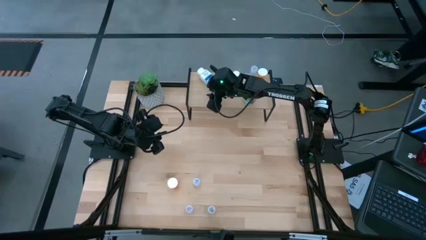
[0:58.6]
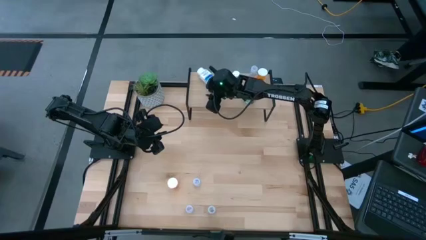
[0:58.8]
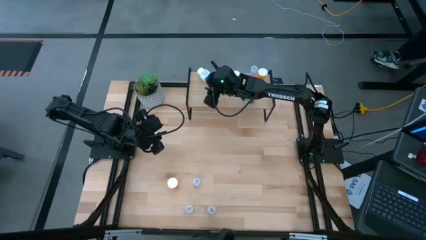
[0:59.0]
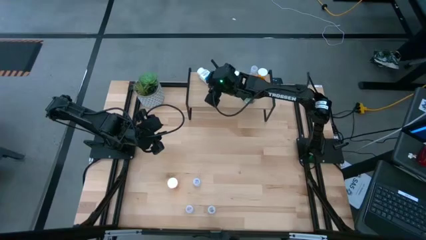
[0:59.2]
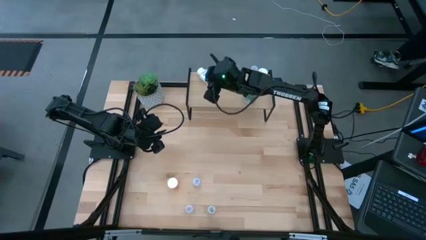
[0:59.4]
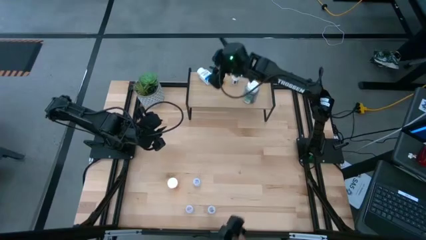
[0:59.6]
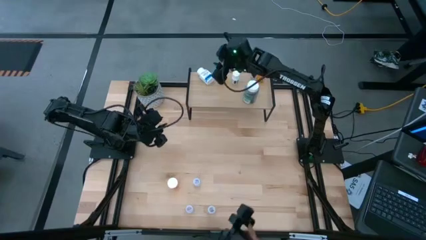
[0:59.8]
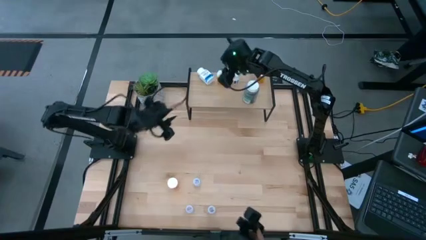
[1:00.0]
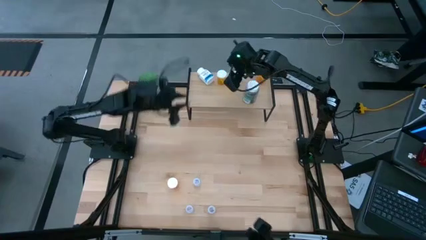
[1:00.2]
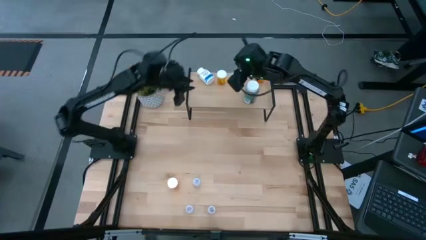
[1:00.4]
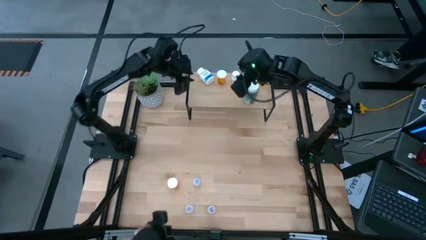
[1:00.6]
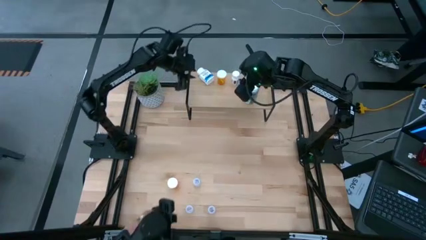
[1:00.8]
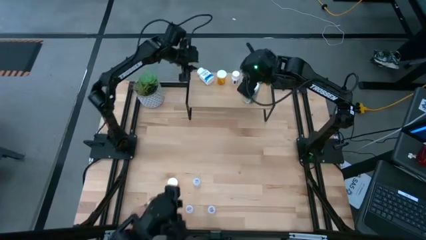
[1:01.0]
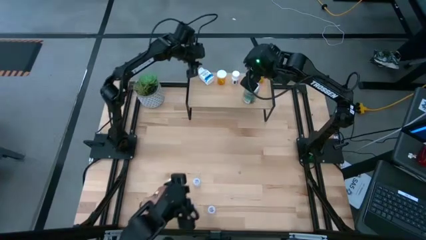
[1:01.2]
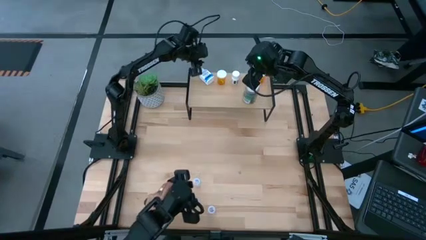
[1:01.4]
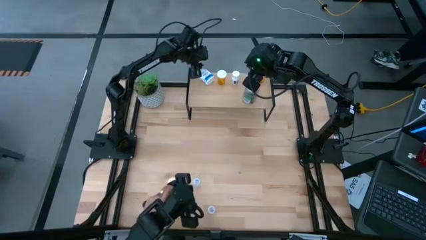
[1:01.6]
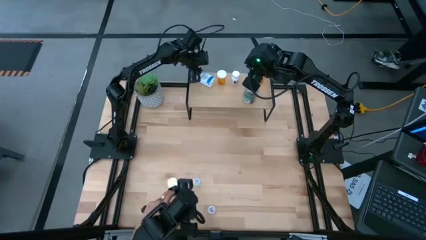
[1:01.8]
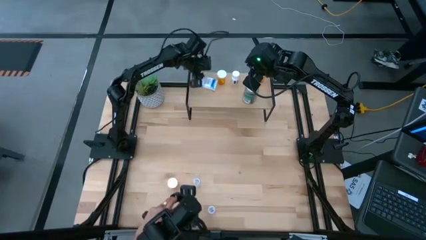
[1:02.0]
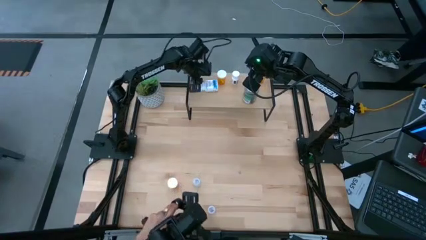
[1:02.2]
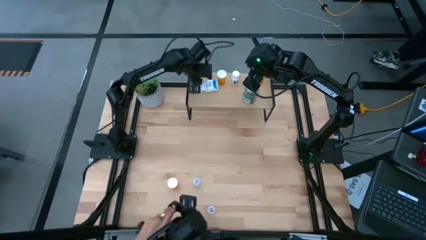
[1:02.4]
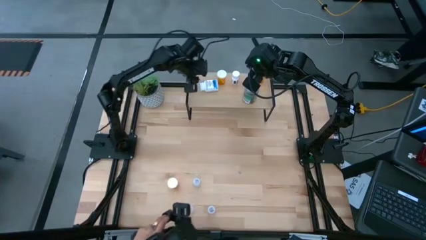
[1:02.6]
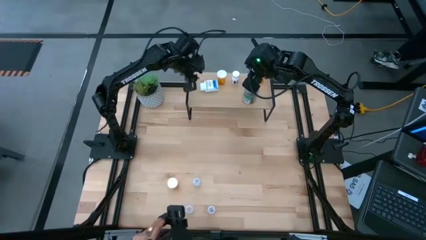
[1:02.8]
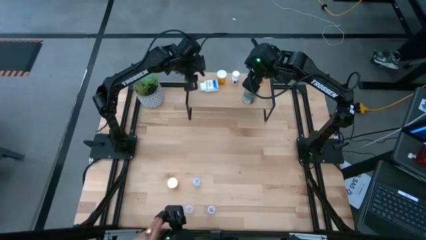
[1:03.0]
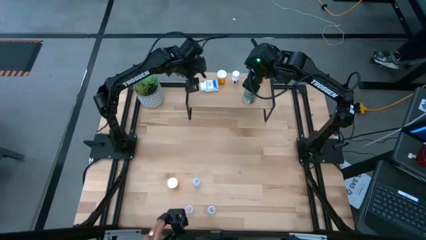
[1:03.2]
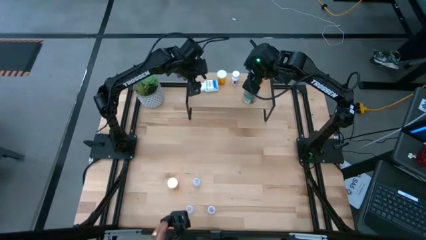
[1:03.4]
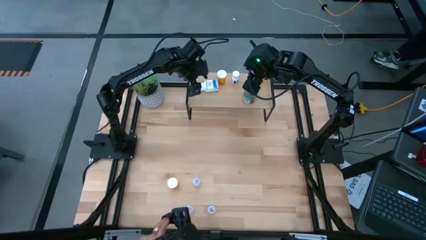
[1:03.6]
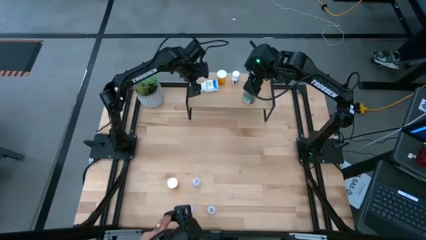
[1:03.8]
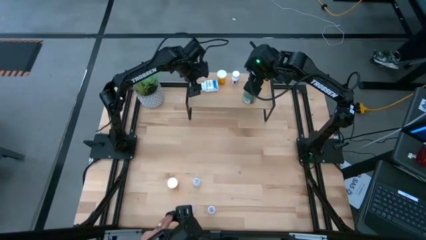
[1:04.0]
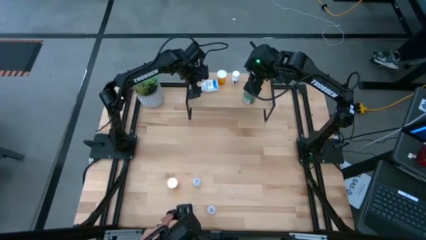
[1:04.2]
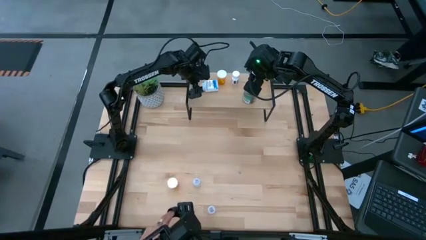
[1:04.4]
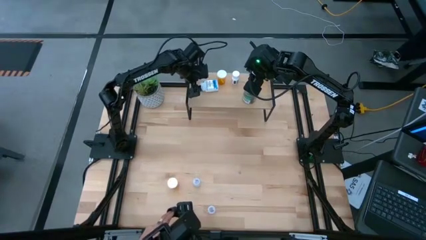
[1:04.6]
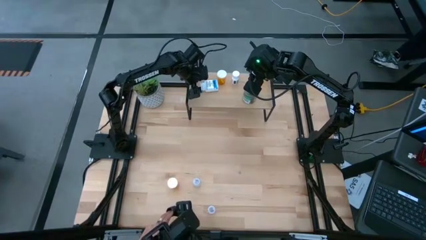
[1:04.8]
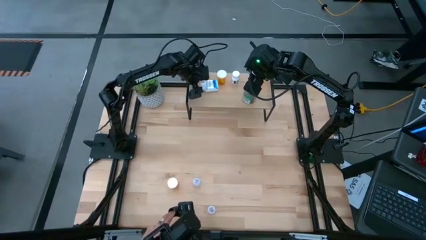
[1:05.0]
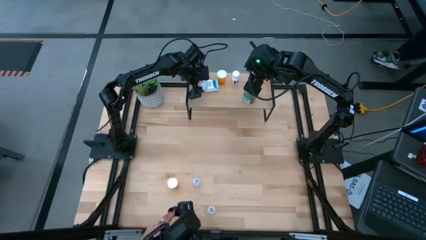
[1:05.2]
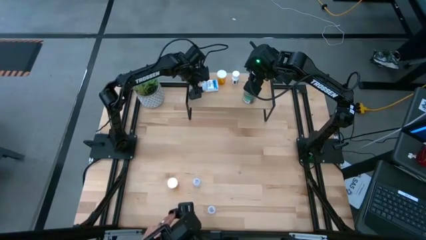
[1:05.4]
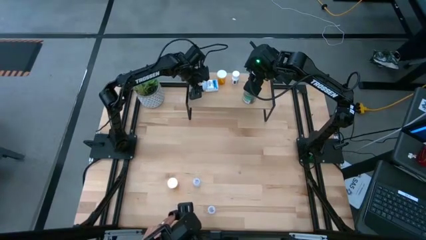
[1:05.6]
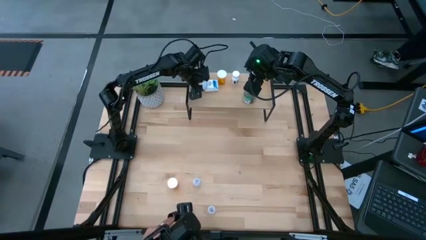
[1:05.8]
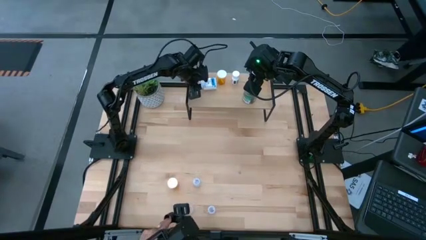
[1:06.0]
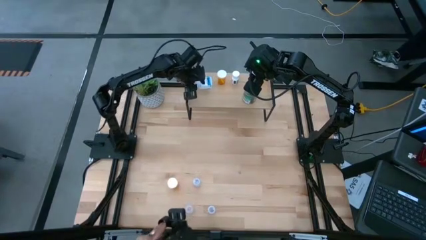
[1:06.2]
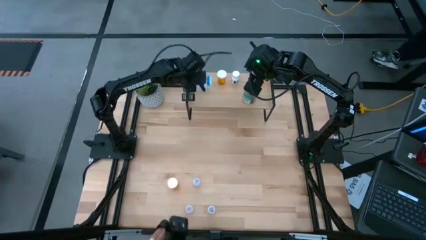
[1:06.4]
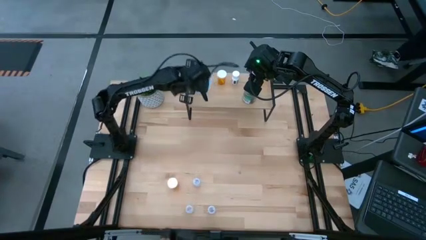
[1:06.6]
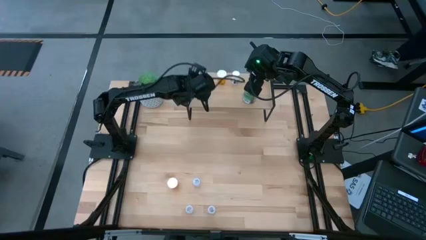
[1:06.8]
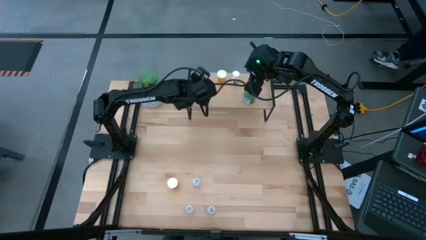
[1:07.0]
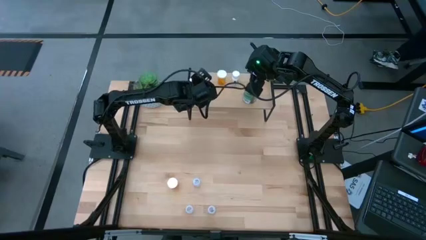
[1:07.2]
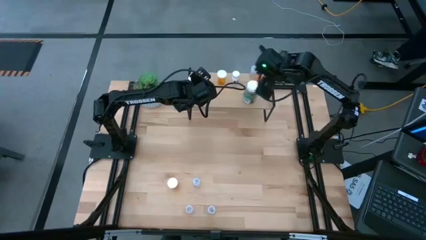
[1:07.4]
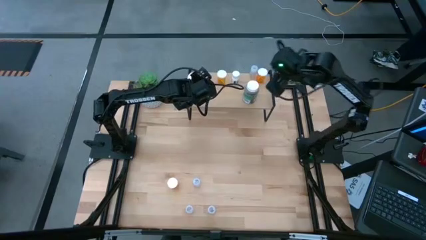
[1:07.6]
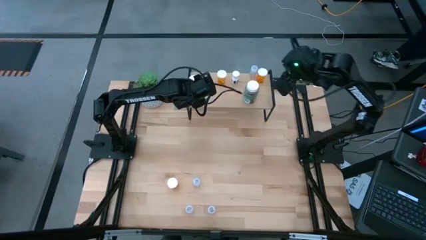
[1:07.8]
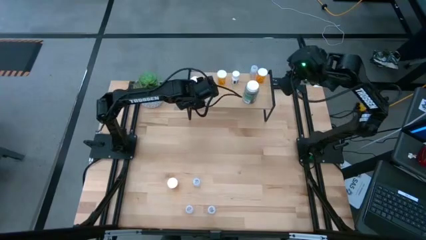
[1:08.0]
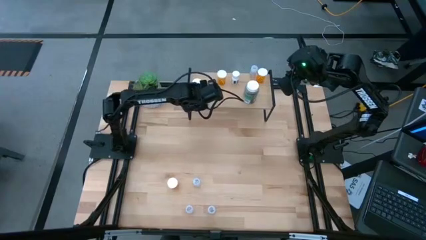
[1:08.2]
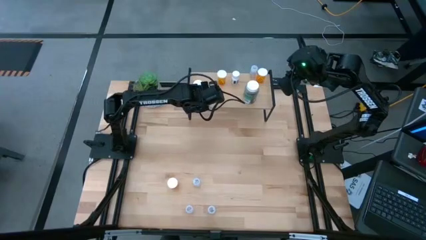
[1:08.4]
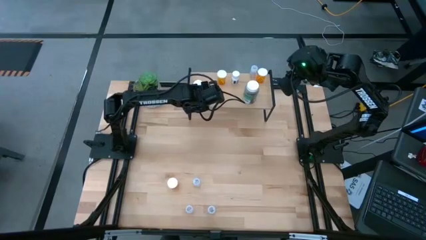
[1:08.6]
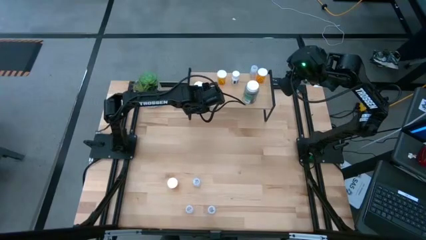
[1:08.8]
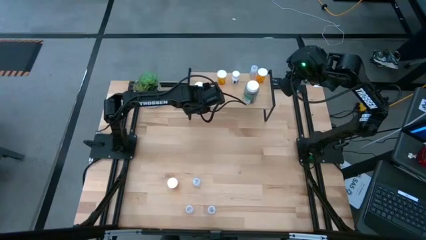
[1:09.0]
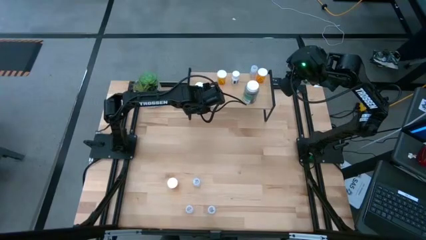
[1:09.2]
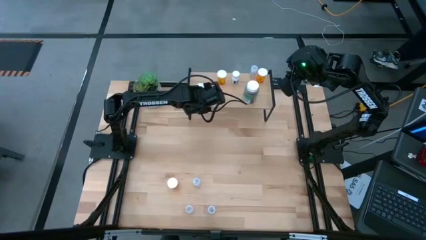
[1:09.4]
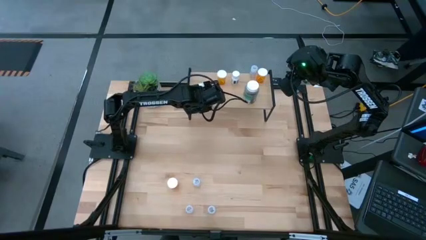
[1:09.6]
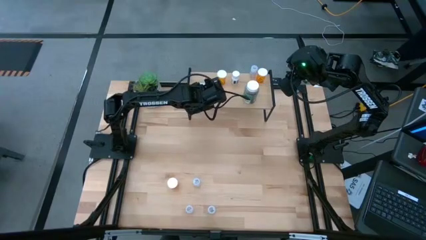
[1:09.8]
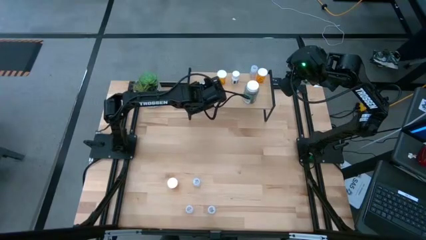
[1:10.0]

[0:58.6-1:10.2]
Task: Pick and place medicine bottles onto shelf by color
Put the white pill bottle on the shelf

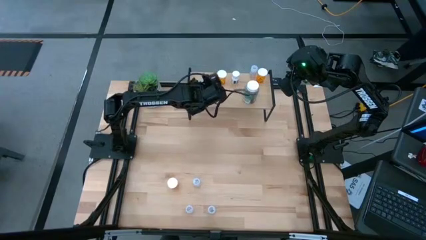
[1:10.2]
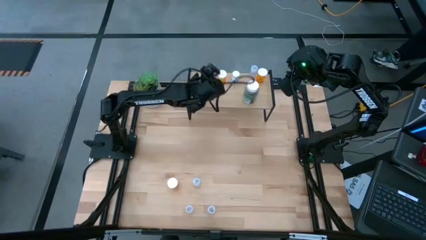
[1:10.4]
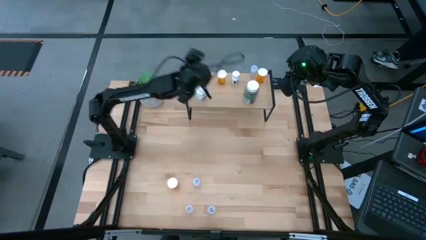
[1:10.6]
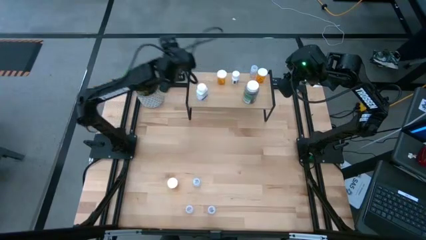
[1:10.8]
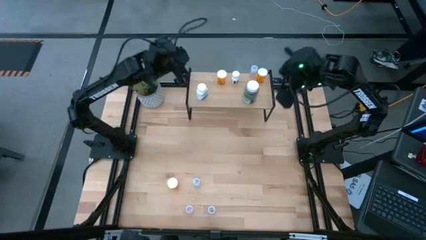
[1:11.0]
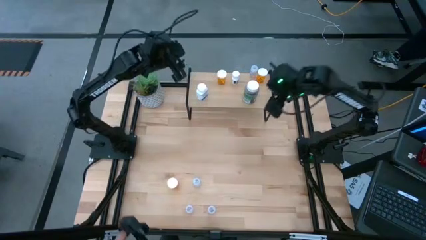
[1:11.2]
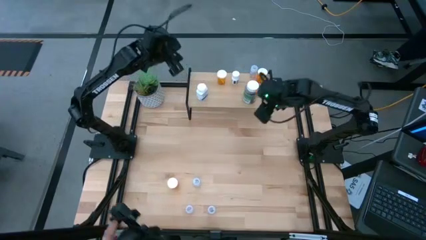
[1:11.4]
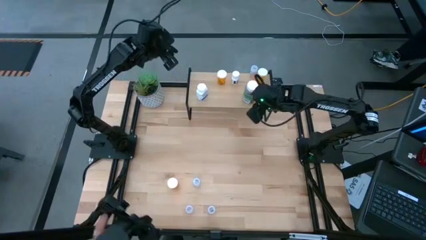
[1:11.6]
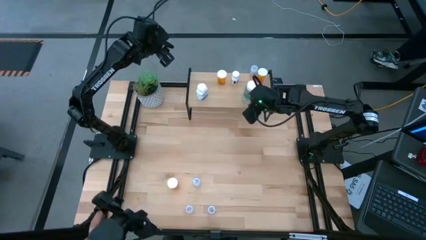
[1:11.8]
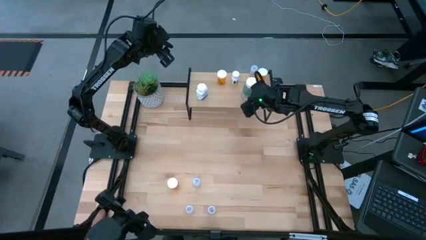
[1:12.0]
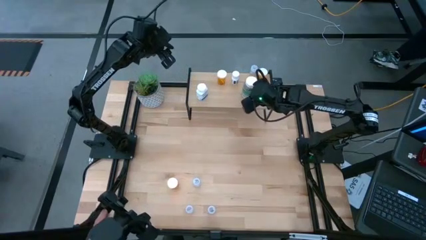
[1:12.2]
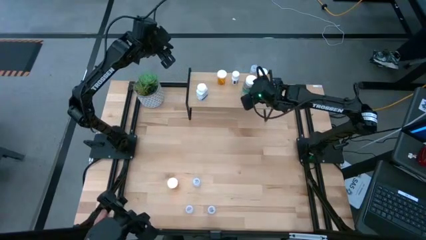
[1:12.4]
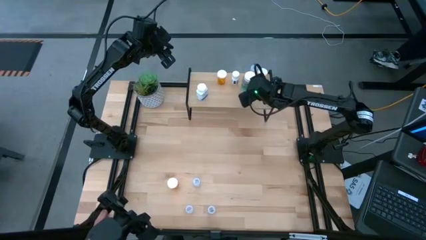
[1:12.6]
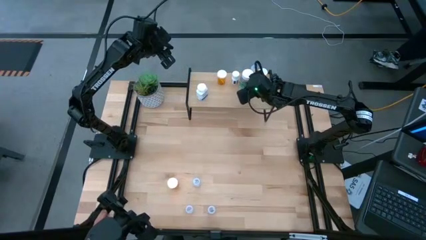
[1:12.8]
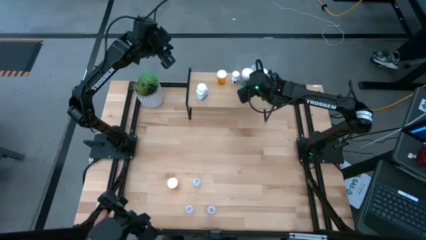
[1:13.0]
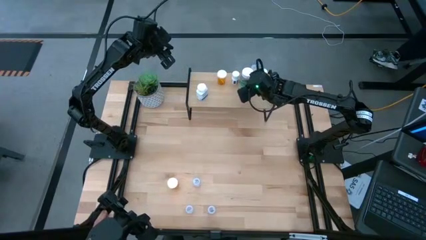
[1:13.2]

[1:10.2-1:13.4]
Adjust the green pill on the shelf

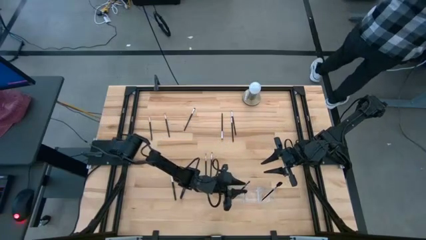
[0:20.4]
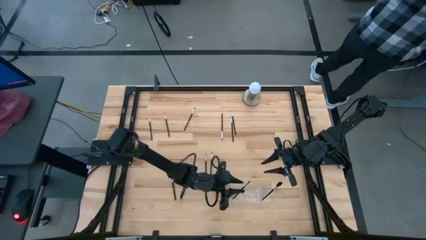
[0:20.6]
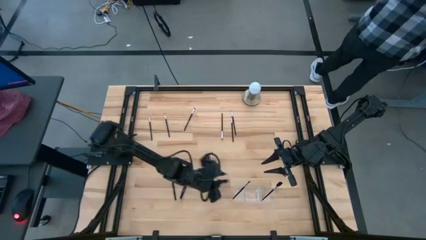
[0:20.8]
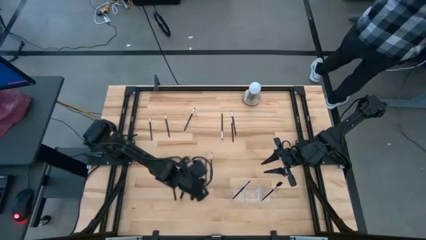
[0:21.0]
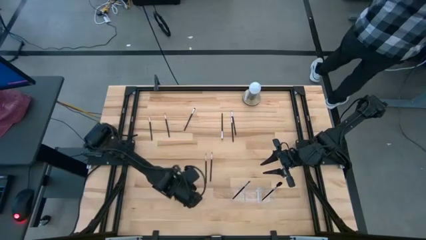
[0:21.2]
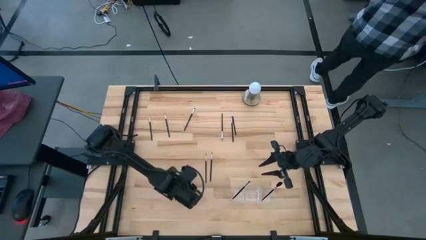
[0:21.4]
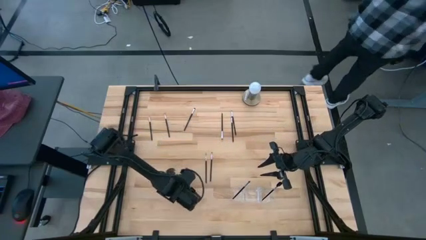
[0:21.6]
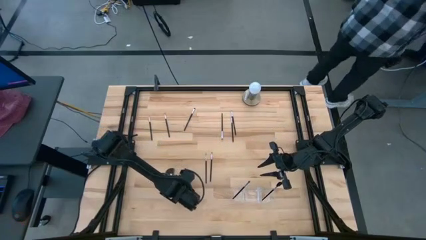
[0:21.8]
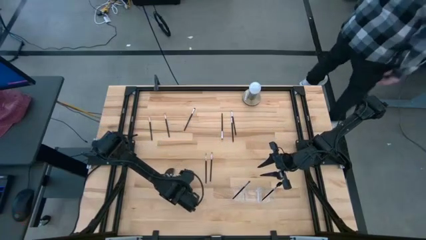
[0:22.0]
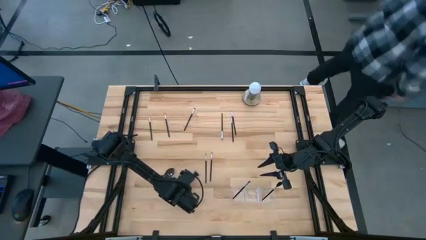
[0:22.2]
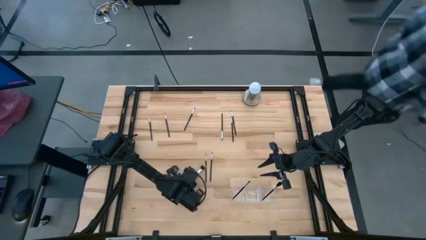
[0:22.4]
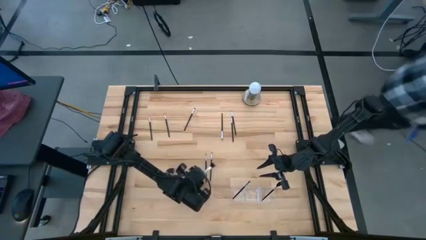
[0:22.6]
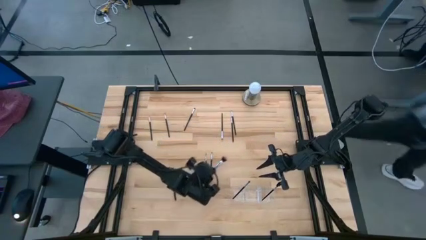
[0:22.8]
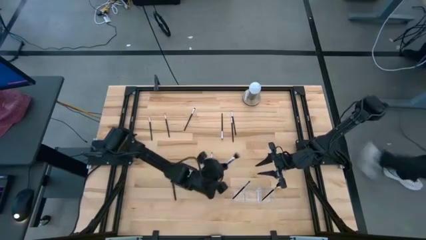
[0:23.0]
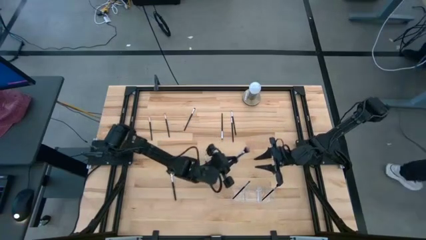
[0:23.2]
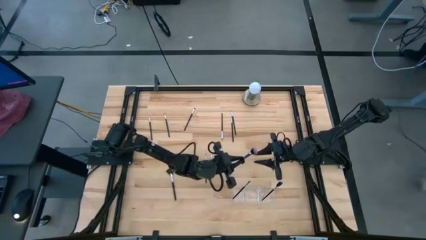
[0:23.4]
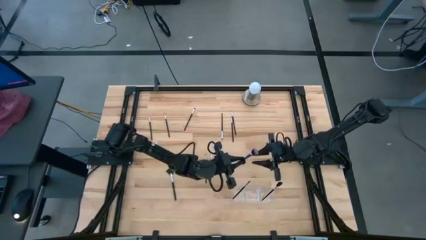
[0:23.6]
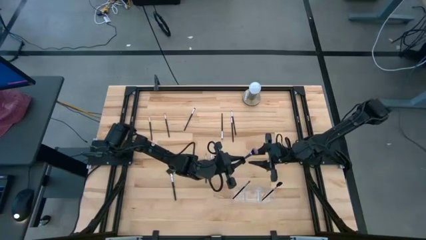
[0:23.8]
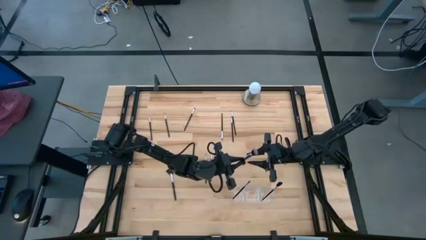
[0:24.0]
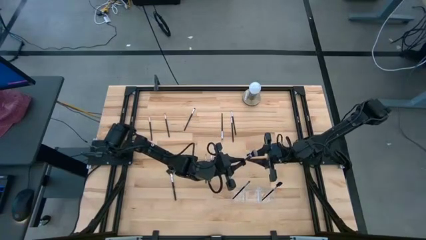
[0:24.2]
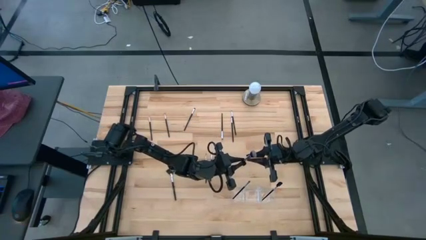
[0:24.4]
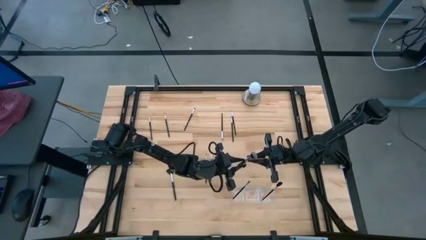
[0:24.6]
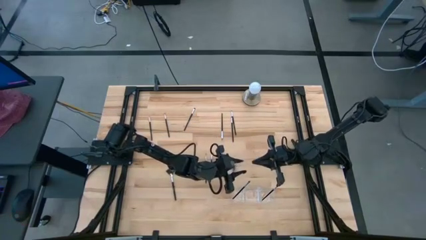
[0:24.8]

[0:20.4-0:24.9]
Task: Put items in baskets/containers
Put the blush brush into the middle section of the transparent organizer
